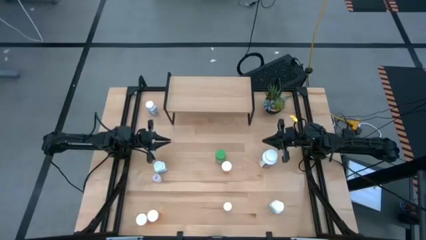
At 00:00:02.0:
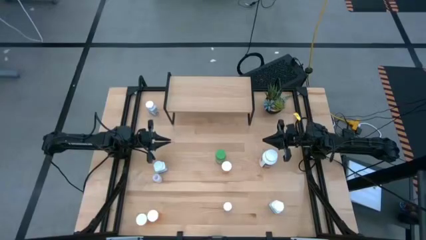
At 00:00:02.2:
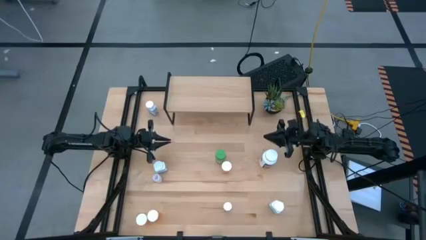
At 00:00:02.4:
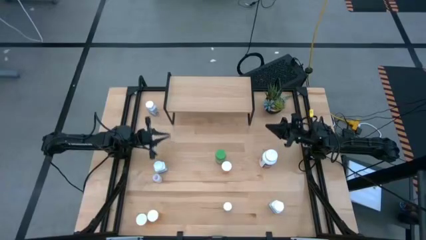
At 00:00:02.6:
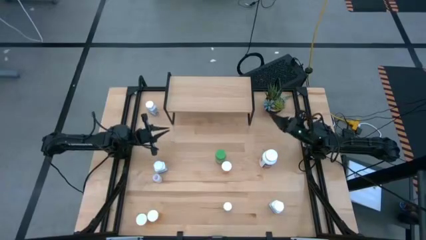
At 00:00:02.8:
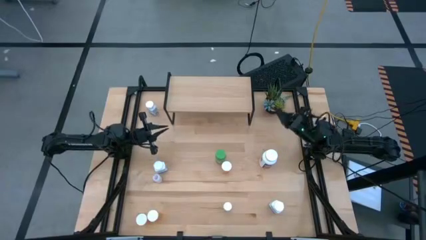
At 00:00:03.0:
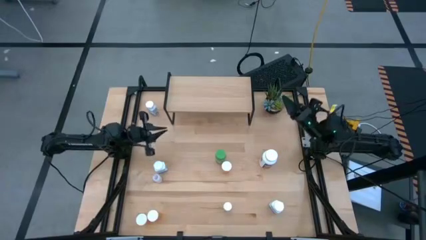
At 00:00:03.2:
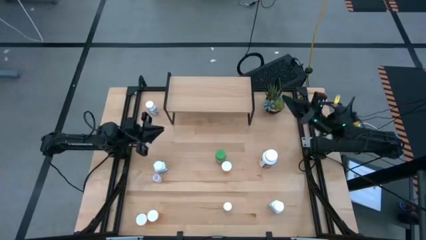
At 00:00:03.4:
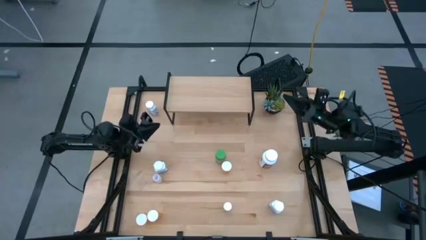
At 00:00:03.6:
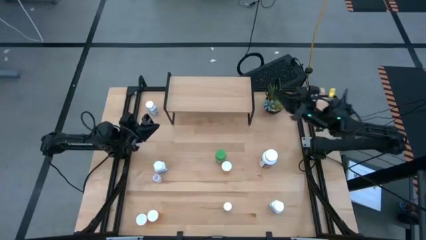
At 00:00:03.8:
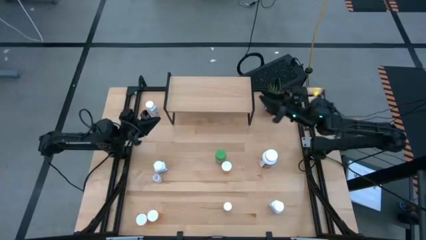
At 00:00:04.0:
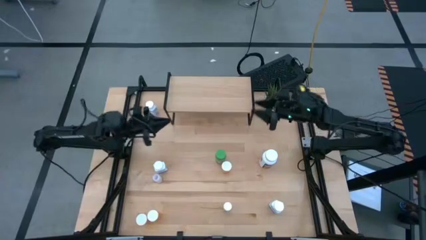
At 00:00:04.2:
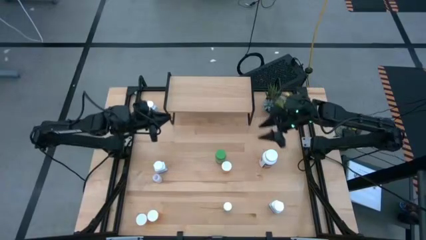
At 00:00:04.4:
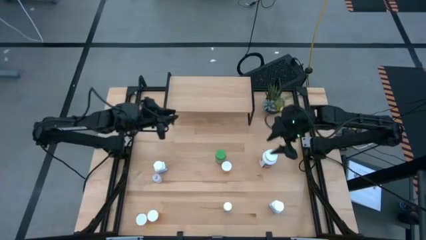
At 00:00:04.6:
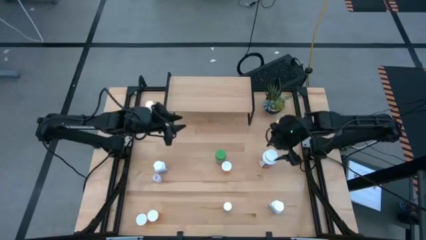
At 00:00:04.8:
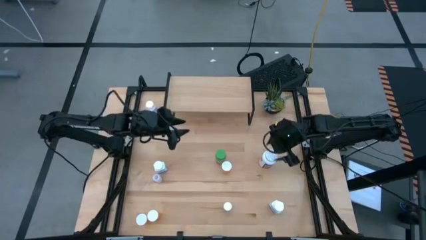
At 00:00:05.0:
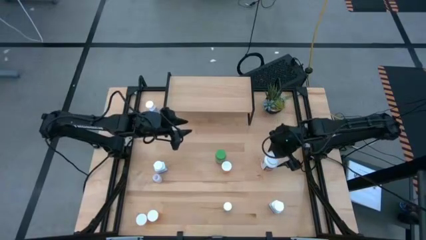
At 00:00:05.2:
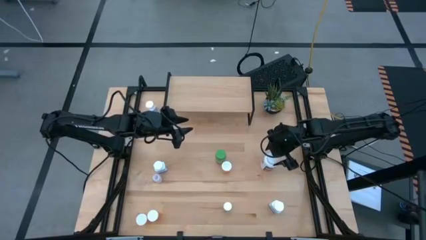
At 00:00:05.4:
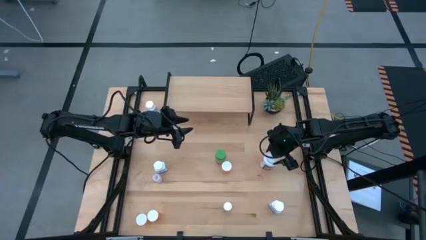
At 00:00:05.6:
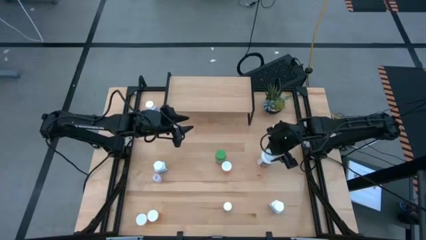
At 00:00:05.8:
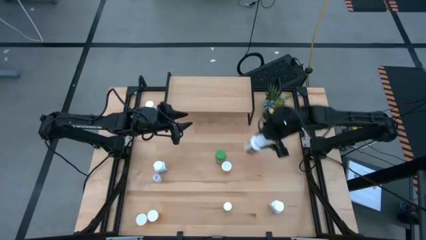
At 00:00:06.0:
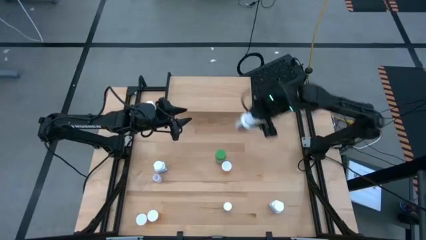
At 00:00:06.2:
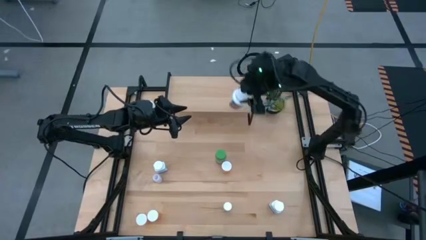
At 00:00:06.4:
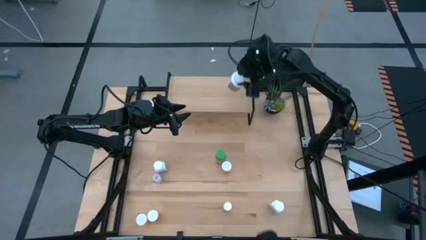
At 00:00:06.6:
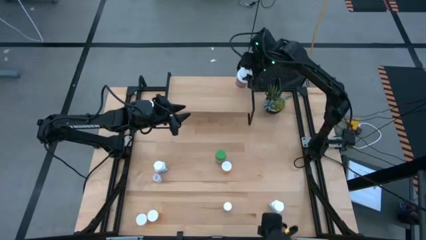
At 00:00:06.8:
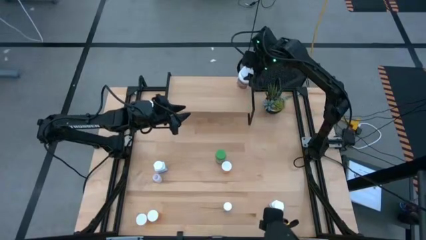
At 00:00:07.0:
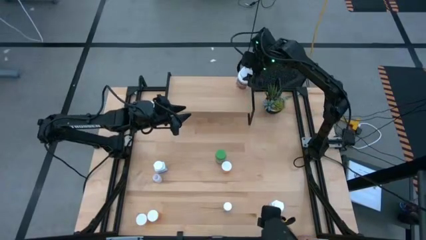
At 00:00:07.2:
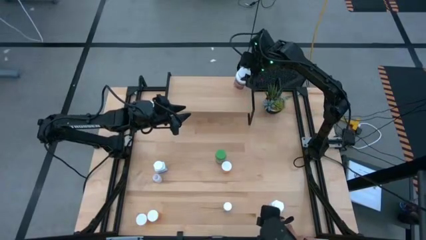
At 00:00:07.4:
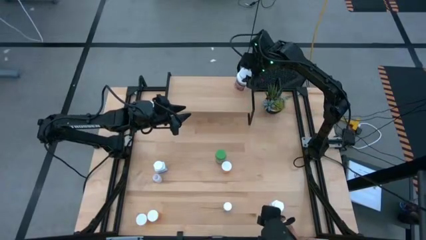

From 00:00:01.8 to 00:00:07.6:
Task: Pick and place medicine bottles onto shelf by color
Put the large white medicine bottle on the shelf

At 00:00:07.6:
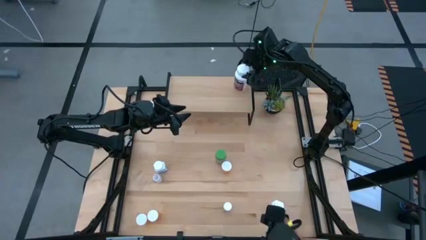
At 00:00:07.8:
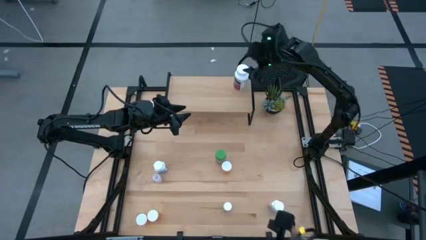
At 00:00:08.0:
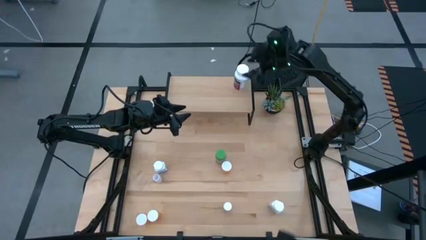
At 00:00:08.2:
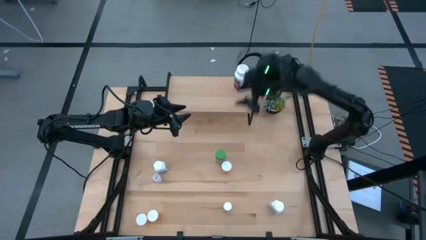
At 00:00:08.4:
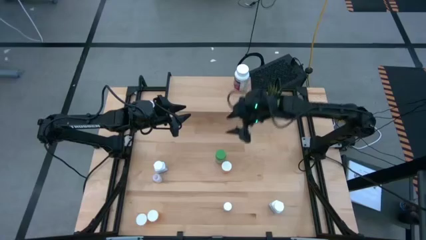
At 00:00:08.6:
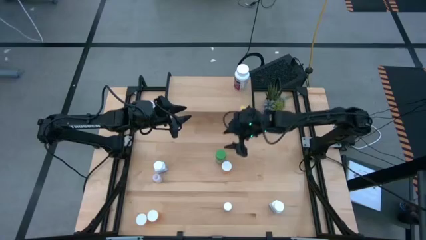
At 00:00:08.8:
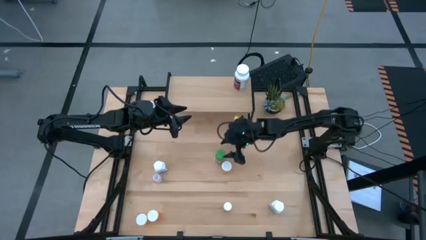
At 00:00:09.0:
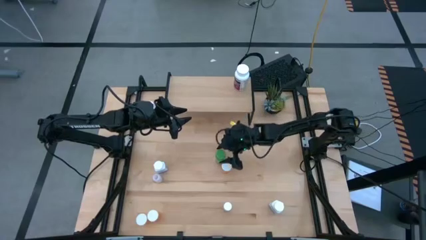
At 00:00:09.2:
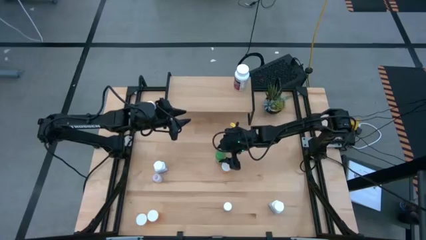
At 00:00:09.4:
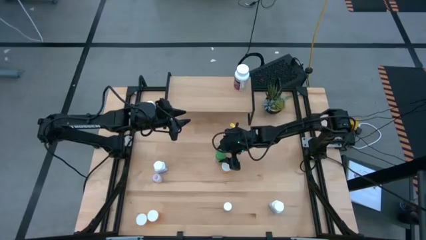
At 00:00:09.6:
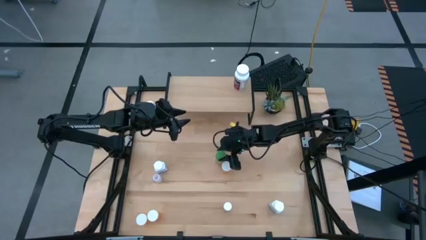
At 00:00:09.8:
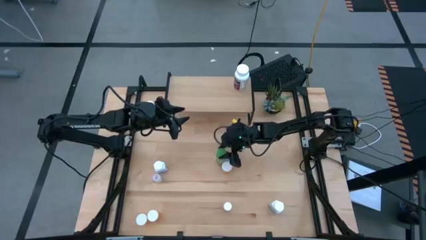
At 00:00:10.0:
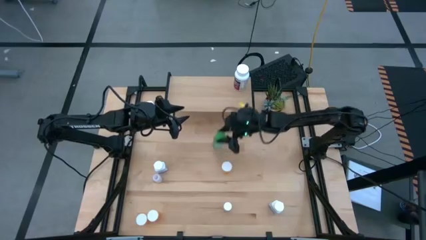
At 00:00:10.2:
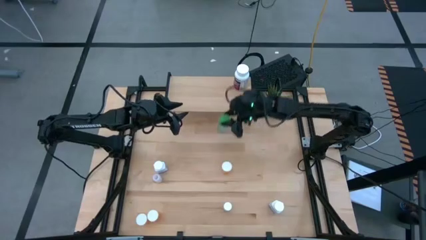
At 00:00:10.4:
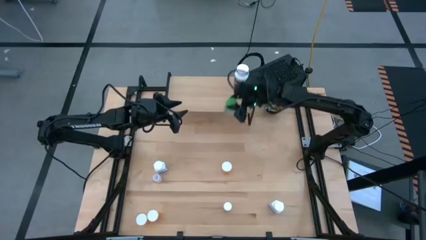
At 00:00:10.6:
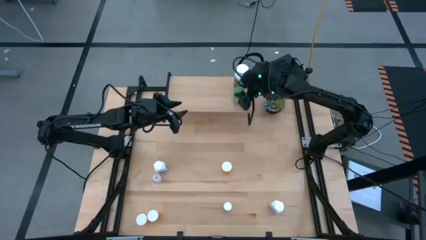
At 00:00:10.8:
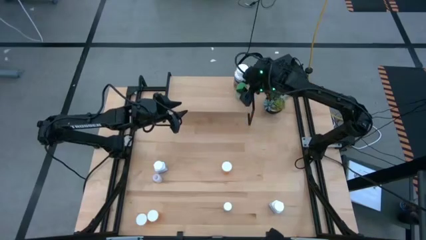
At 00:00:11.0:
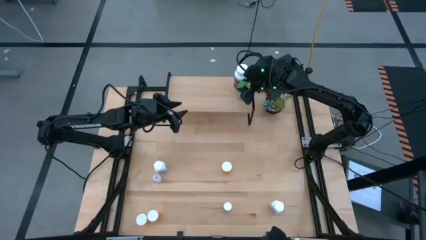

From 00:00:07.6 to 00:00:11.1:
Put the green pill bottle on the shelf

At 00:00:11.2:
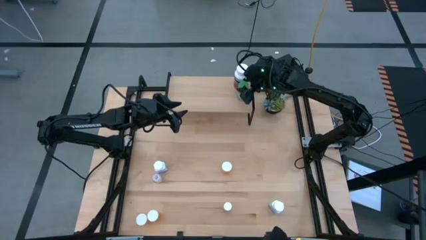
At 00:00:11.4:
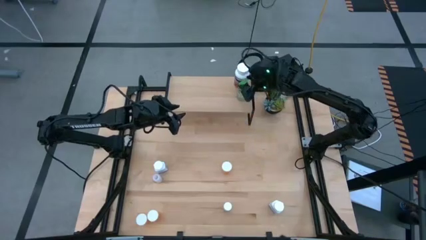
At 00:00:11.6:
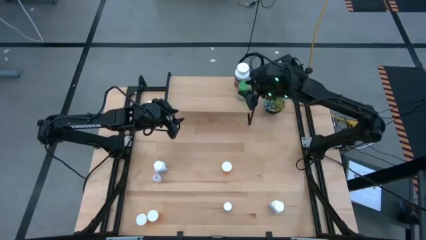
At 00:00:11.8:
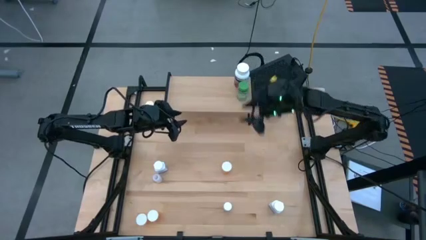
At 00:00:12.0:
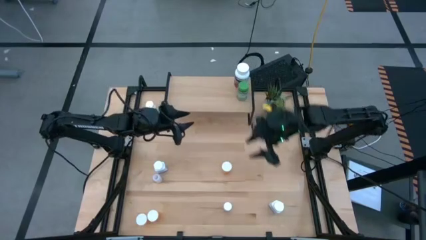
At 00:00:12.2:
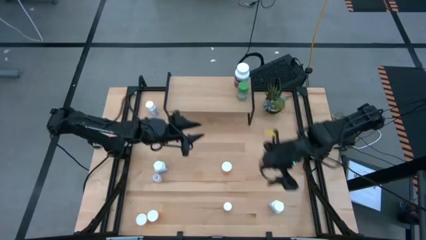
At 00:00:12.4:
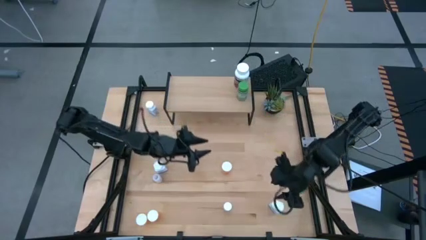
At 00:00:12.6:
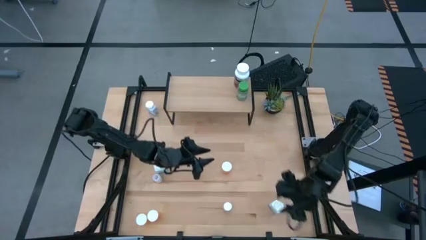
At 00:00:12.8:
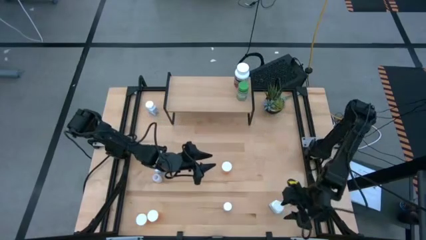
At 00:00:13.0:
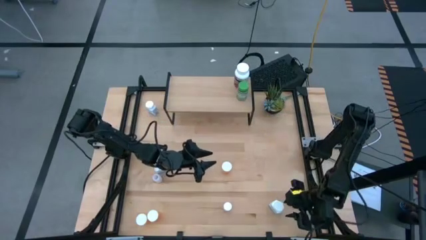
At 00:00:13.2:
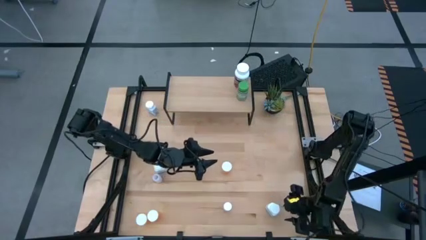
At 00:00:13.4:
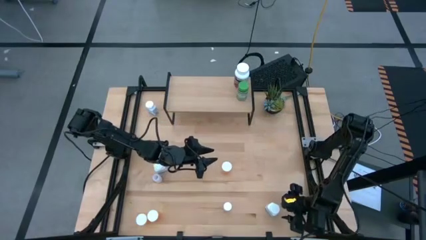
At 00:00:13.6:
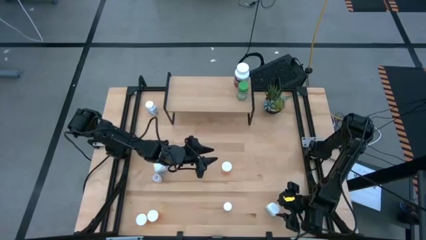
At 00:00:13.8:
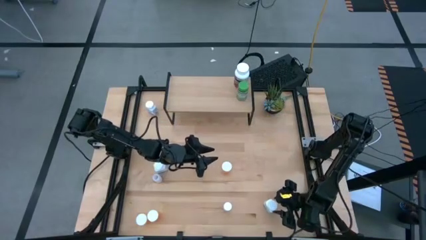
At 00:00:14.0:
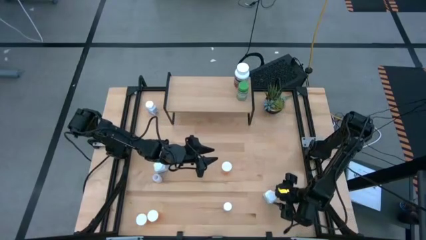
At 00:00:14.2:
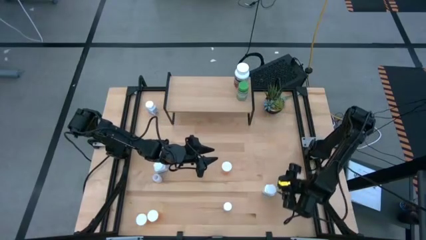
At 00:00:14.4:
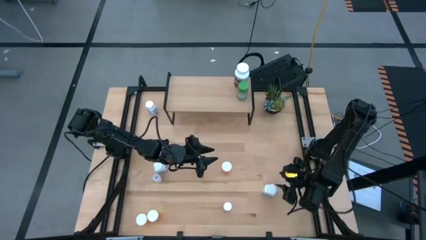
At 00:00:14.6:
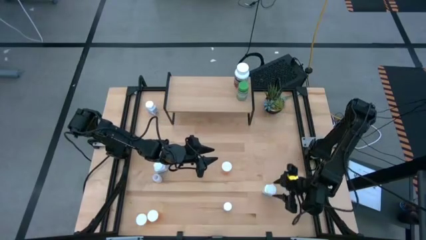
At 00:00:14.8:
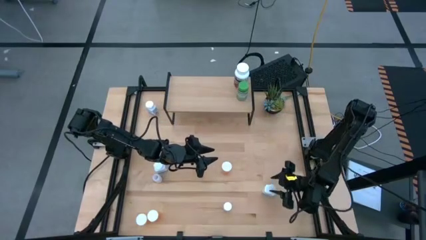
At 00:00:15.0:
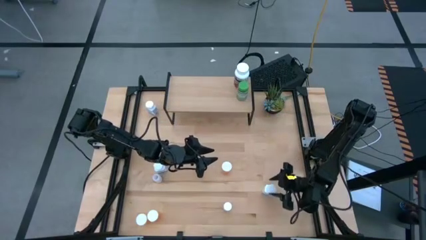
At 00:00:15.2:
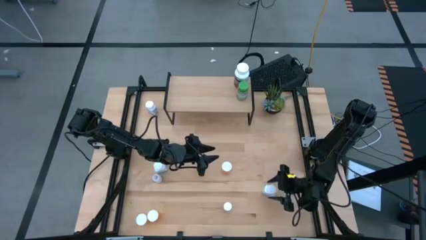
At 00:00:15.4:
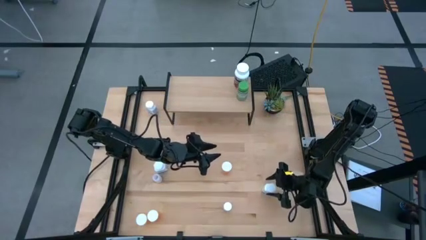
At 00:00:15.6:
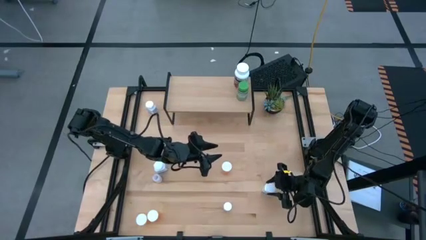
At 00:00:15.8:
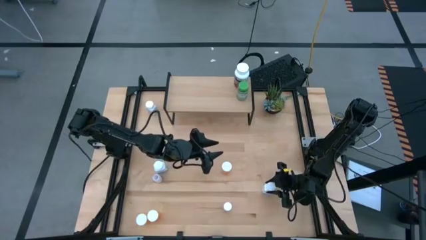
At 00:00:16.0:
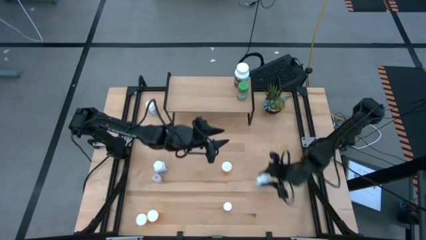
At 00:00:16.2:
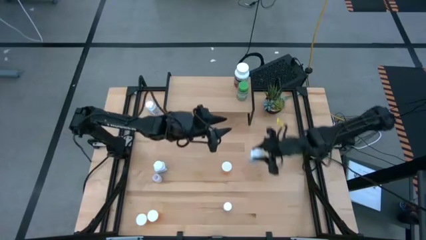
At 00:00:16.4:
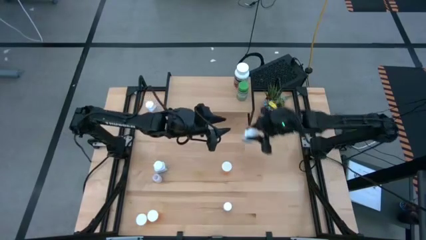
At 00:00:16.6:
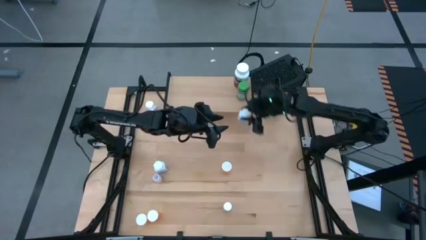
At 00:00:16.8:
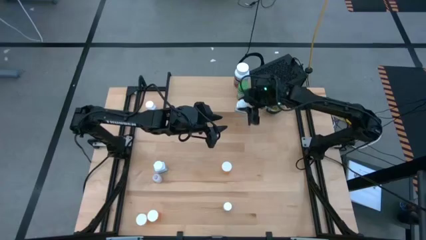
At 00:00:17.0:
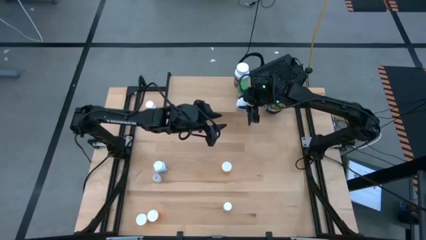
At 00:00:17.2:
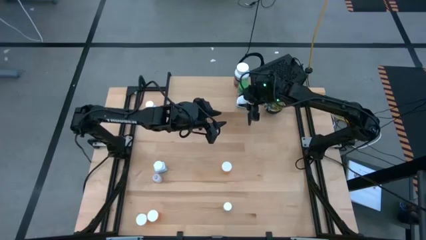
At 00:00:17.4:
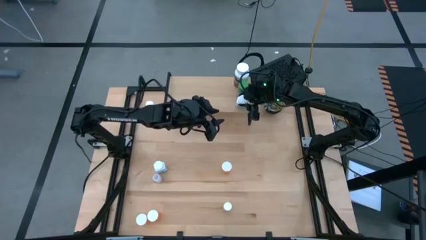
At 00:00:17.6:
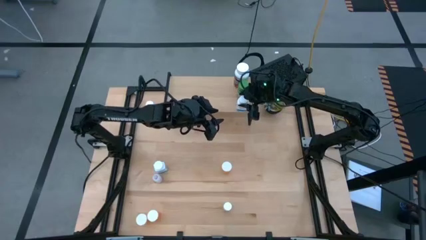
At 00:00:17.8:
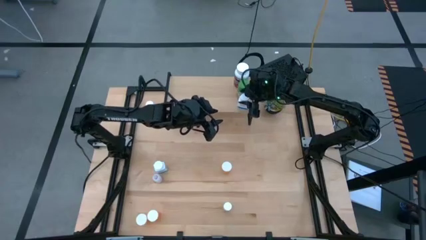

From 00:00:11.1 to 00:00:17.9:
Put the bottom white medicine bottle on the shelf

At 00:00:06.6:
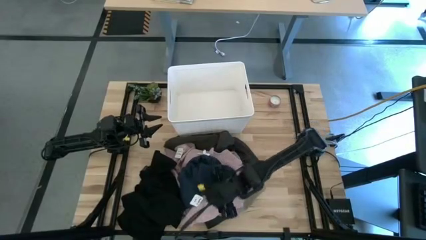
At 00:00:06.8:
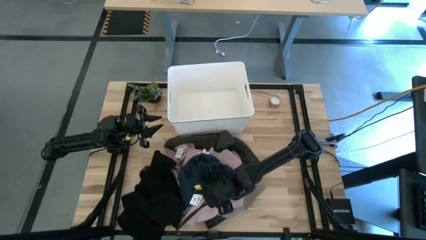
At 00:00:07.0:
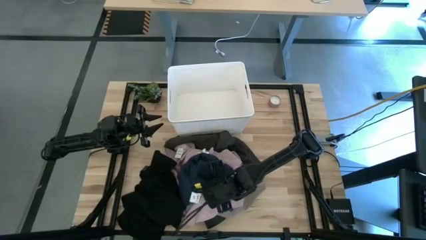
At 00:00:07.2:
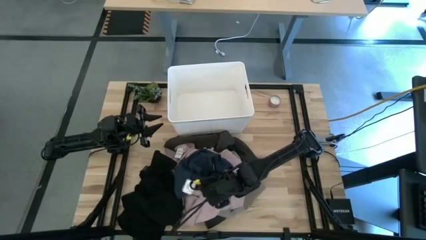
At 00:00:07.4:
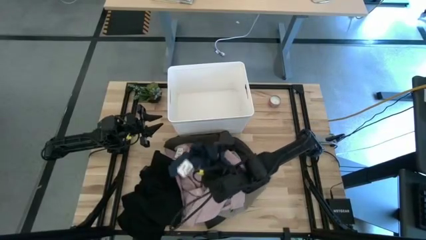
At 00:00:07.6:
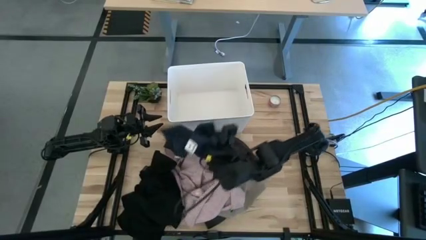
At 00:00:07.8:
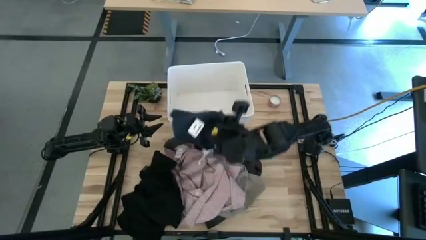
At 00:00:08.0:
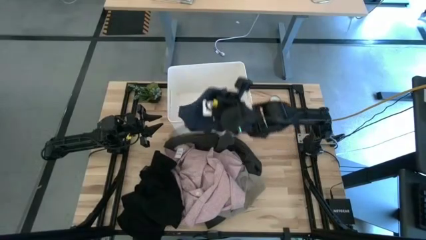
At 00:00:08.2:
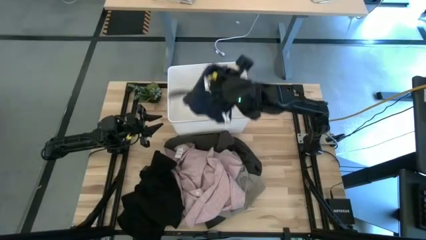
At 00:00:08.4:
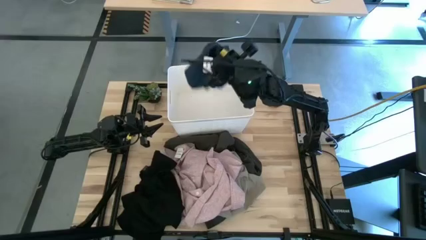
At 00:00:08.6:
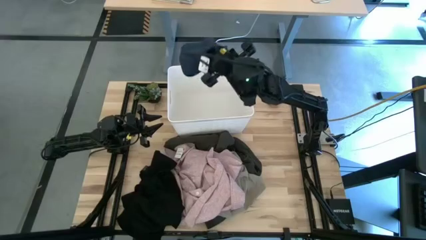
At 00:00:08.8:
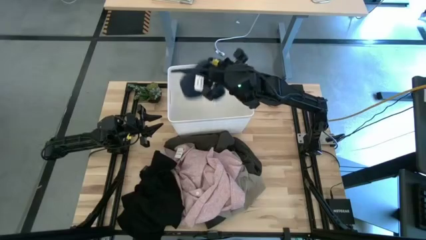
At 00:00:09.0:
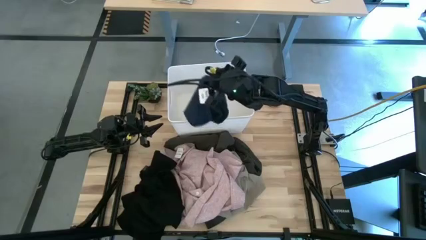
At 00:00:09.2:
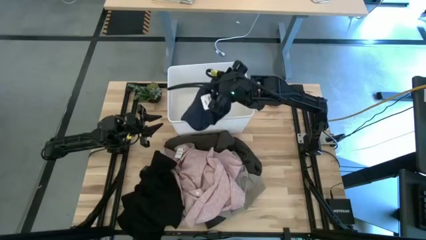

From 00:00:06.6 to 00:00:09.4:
Task: Sort clothes
Put the dark blue pants into the white bin
